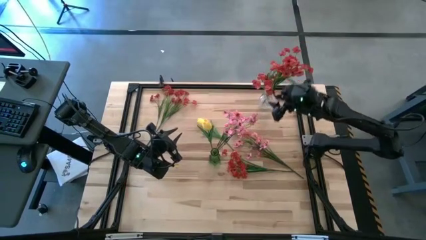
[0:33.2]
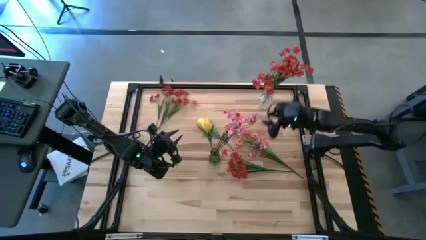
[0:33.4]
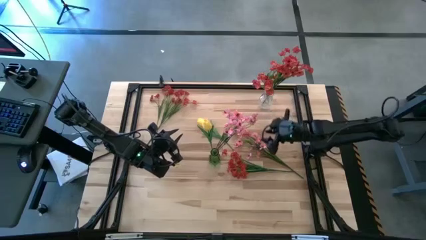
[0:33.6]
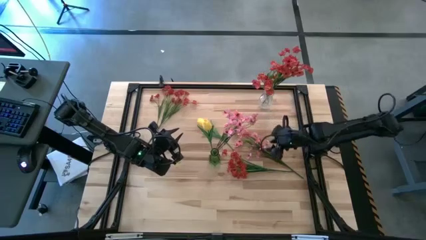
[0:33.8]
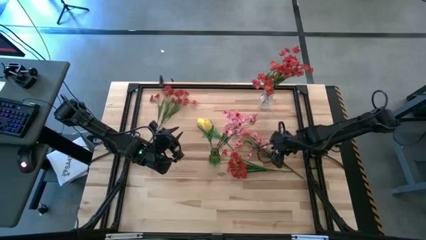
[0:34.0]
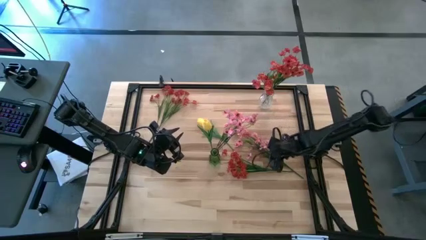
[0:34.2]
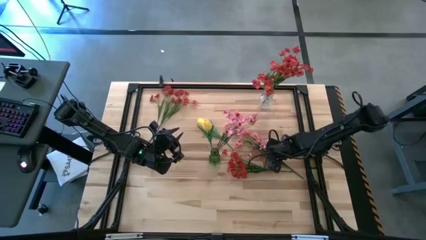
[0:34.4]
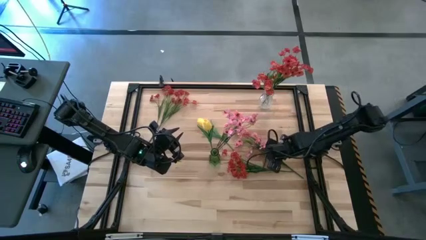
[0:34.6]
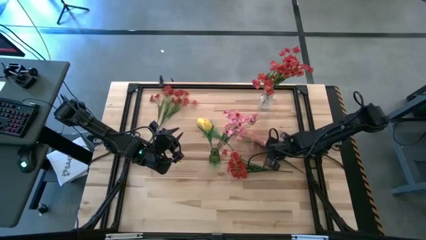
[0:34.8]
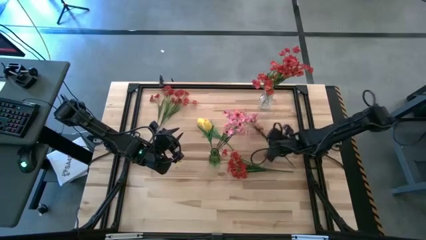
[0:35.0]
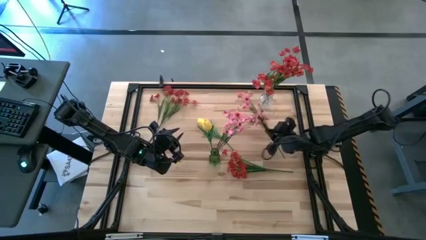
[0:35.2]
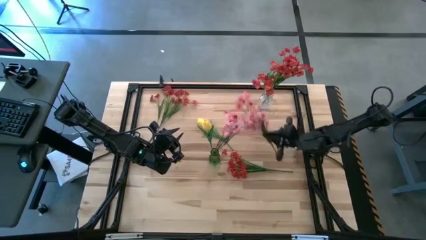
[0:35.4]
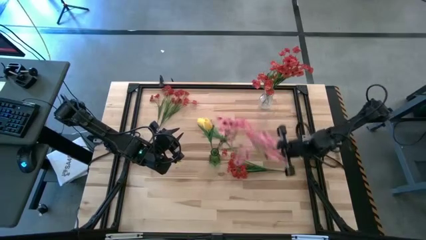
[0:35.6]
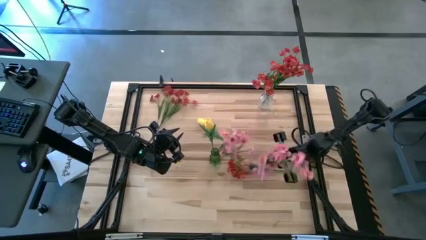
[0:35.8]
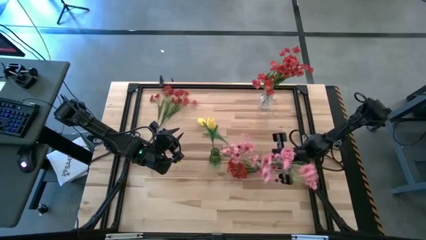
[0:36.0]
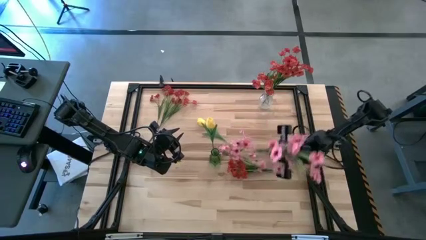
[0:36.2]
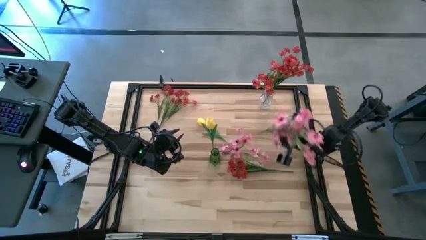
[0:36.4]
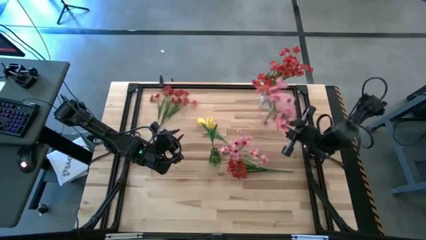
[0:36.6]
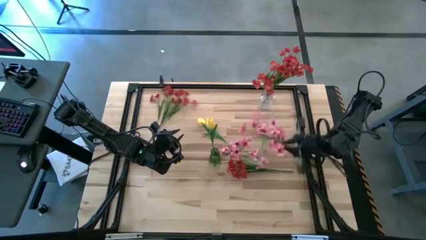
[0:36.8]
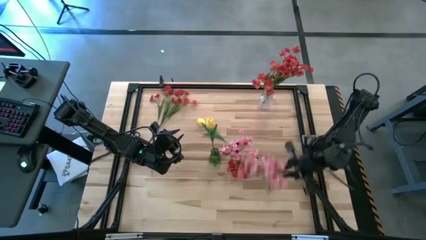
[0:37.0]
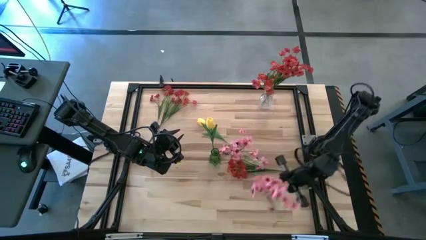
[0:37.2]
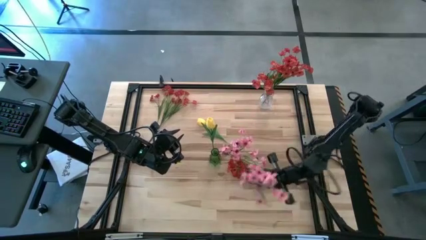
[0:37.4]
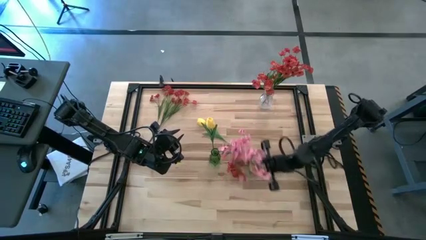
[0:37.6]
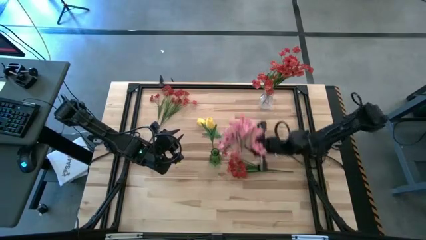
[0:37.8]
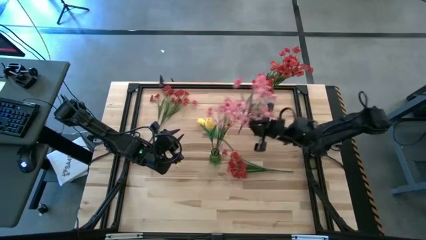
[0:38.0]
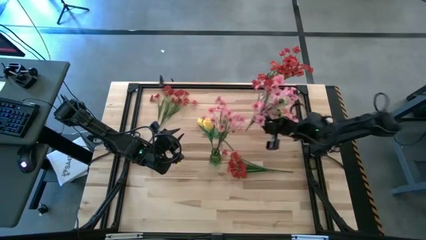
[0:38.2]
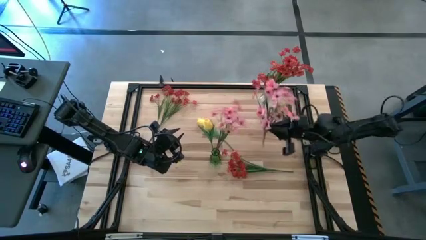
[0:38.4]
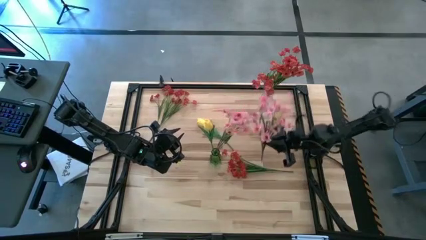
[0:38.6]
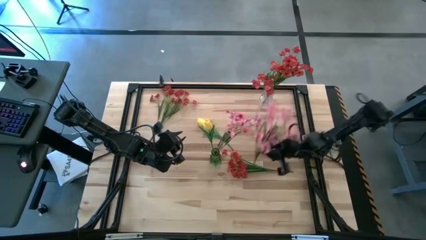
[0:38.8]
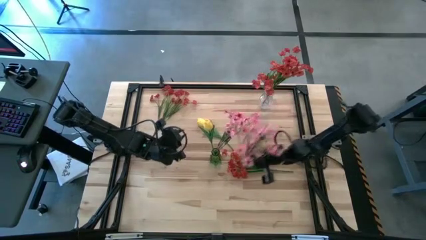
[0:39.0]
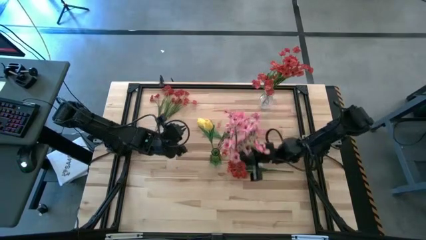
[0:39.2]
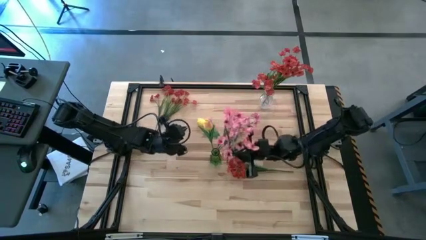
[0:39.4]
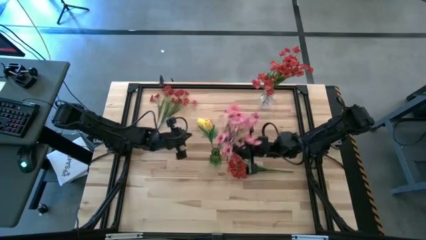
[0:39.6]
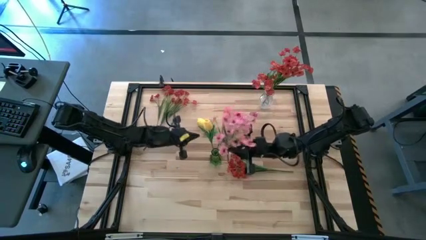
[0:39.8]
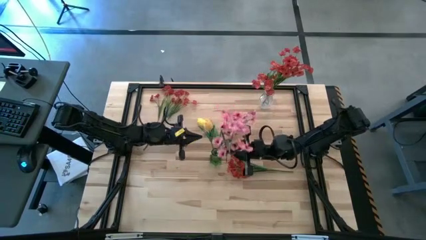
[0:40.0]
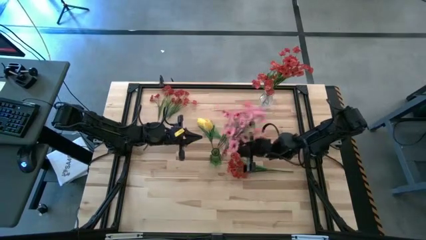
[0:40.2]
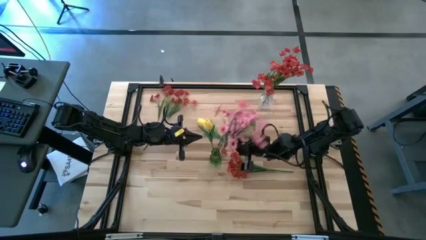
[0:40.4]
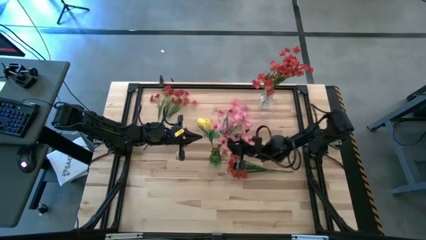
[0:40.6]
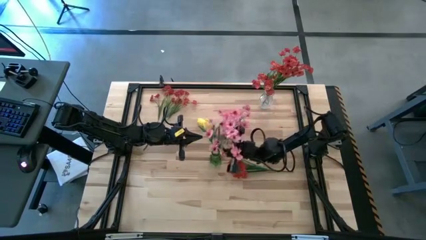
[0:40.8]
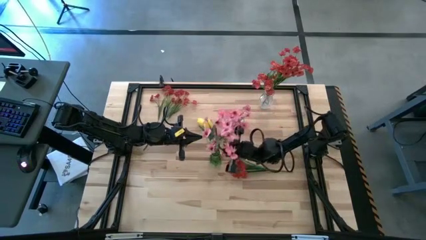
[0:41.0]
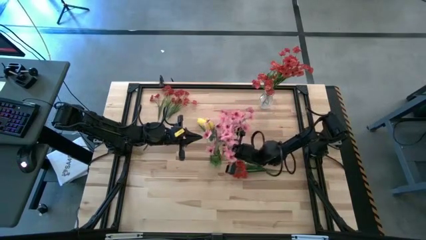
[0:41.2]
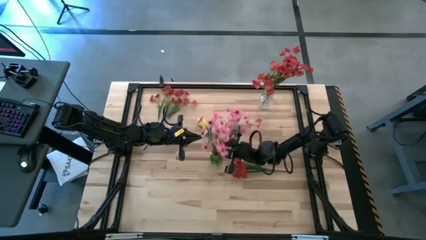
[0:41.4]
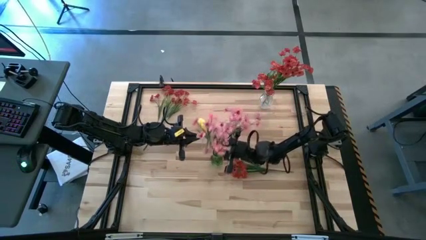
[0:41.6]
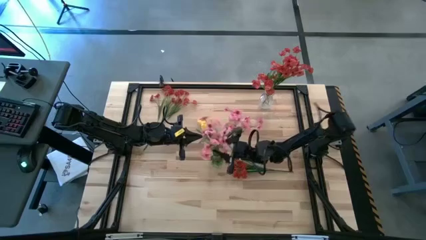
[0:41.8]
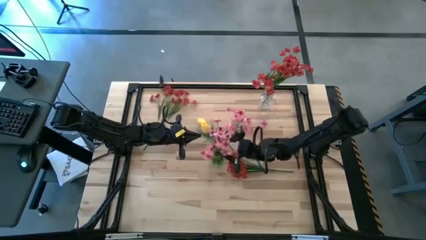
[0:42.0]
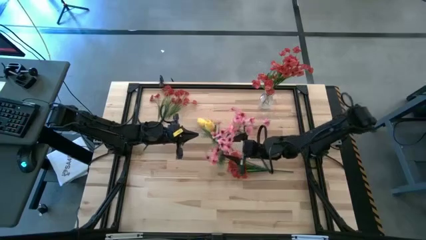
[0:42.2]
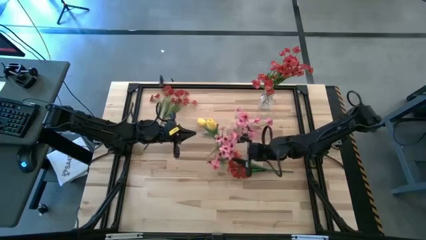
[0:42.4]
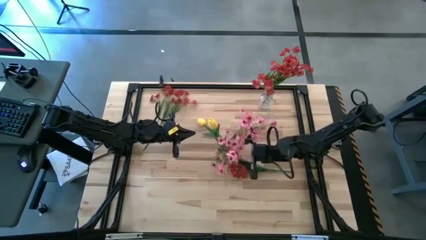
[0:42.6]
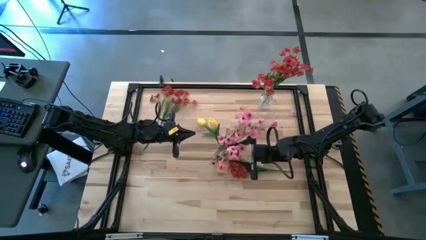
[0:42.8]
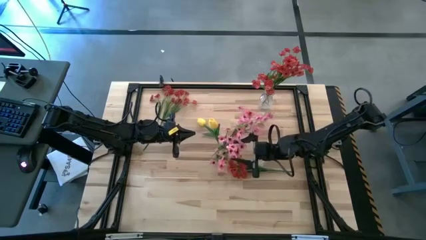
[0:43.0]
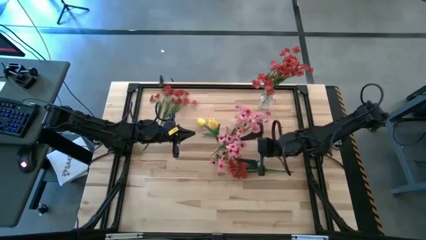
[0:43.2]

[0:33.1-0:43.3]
Task: Sort flowers into vase by color
Put the pink flowers into the green vase

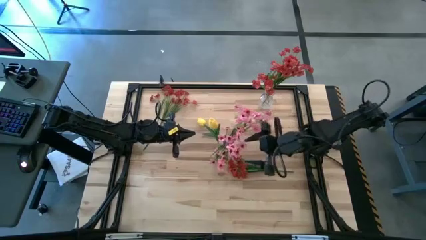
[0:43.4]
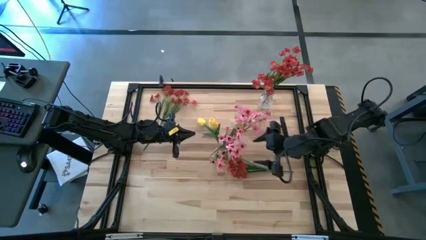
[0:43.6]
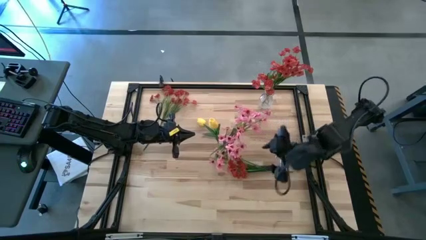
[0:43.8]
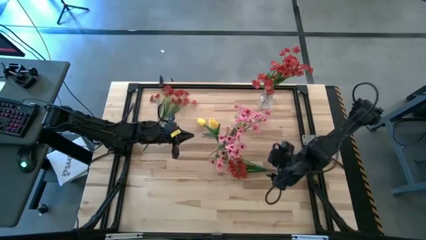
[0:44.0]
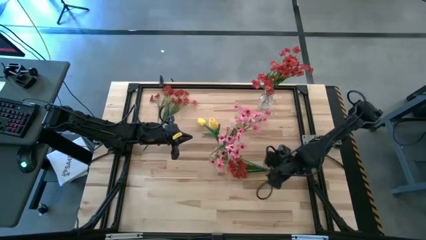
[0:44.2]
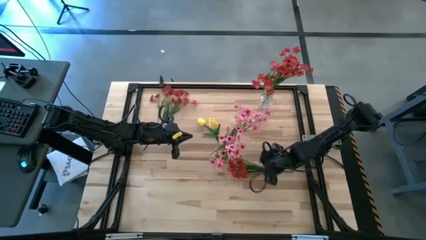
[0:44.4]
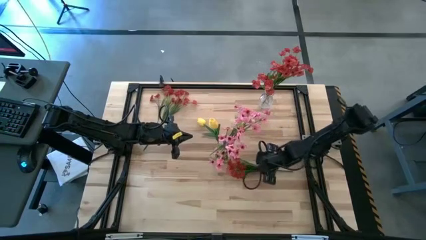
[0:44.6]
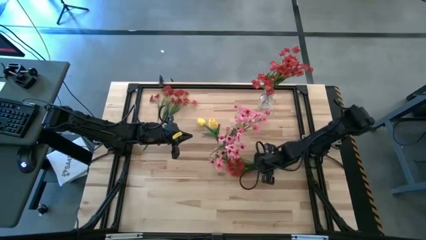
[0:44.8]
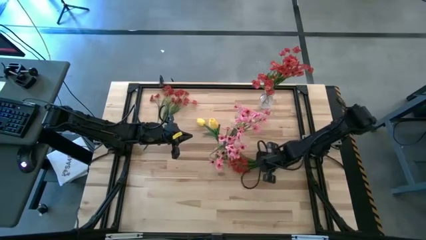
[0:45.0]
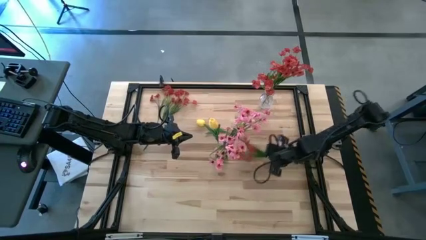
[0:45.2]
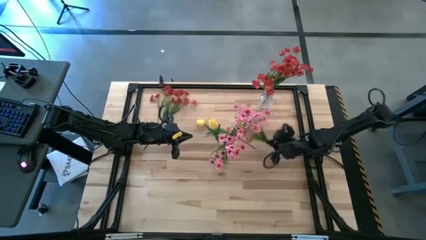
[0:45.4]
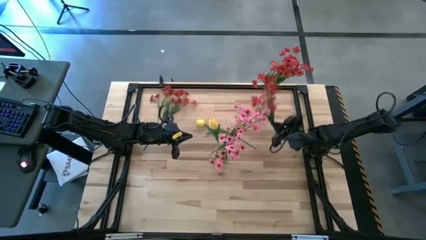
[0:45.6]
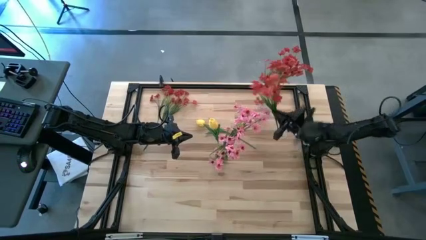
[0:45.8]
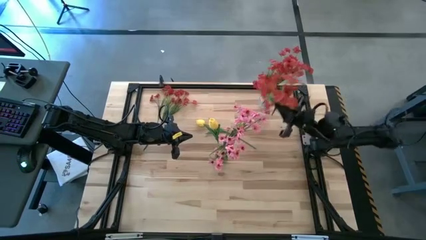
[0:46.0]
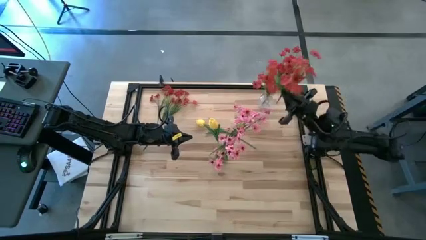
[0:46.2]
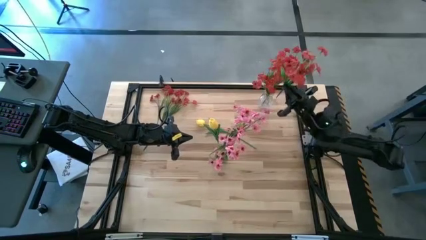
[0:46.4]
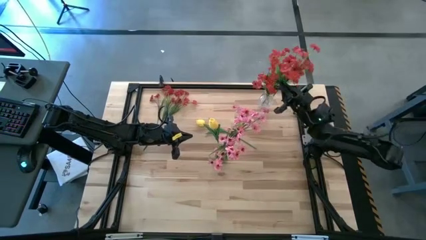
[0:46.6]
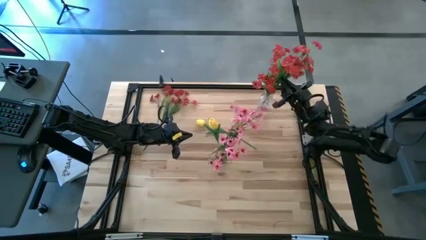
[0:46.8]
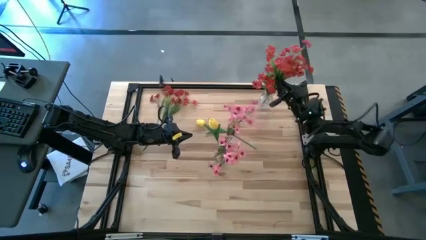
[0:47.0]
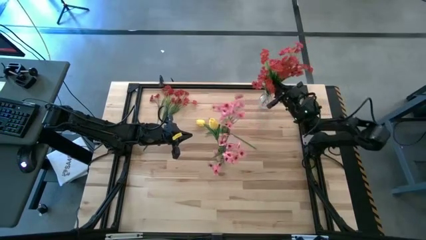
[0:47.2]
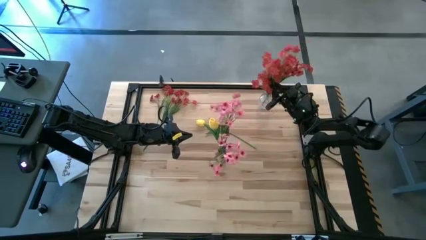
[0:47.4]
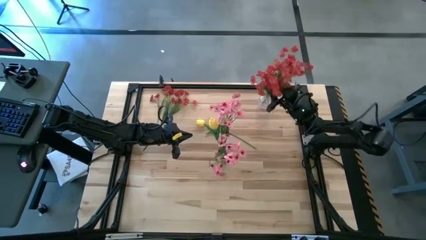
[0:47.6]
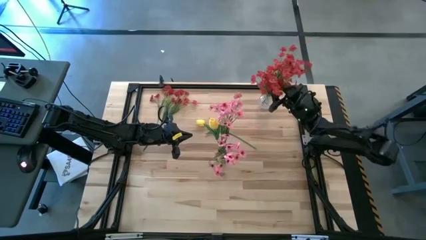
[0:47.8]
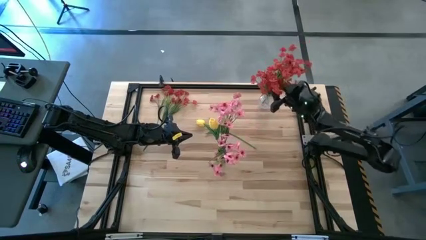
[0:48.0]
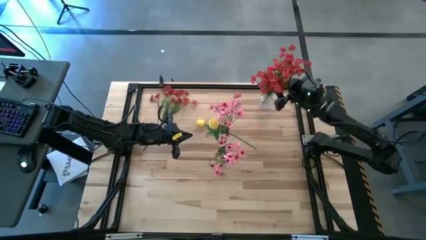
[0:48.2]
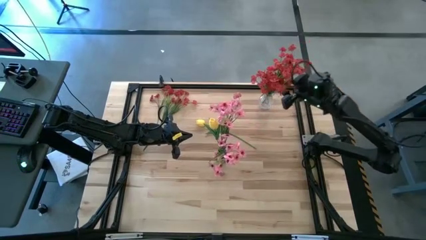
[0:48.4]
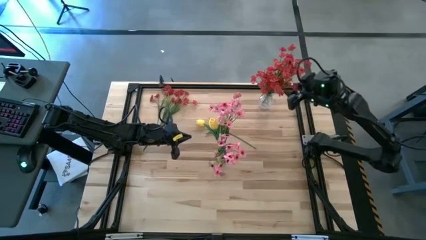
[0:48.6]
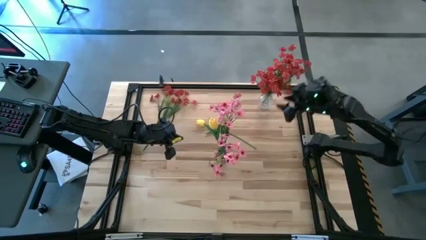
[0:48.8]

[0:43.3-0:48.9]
Put the bottom red flowers into the transparent vase

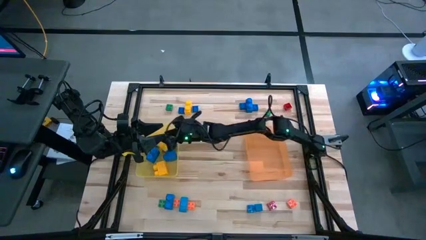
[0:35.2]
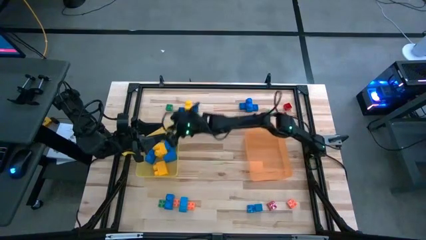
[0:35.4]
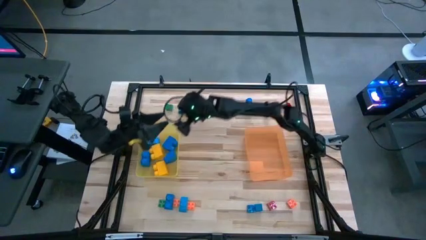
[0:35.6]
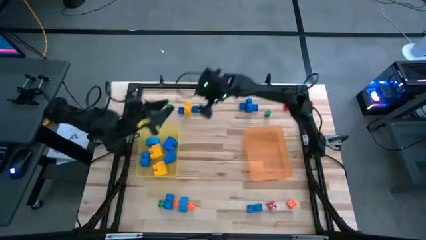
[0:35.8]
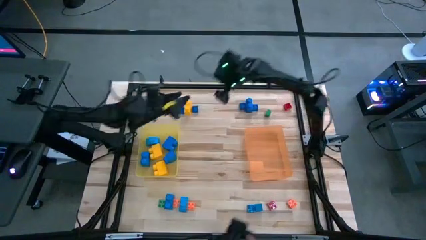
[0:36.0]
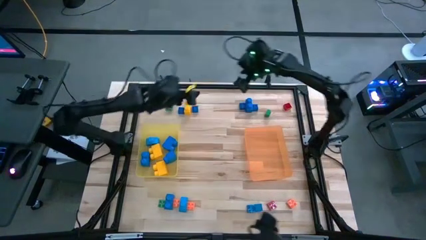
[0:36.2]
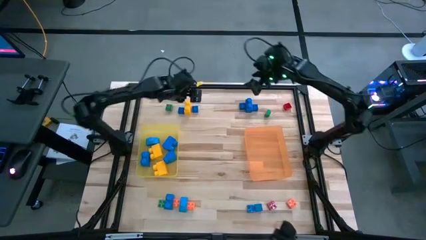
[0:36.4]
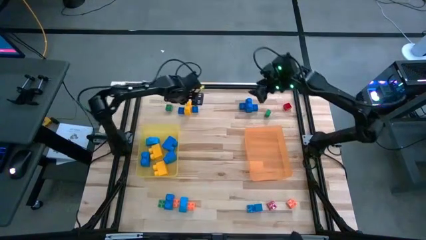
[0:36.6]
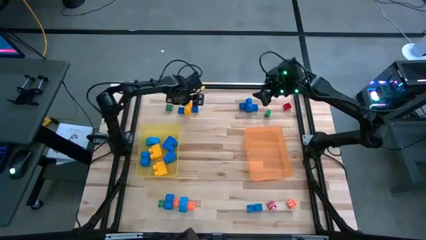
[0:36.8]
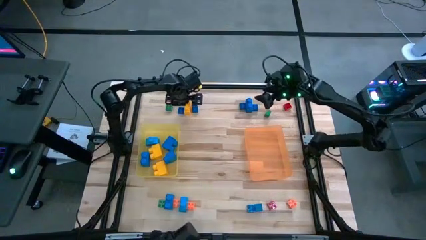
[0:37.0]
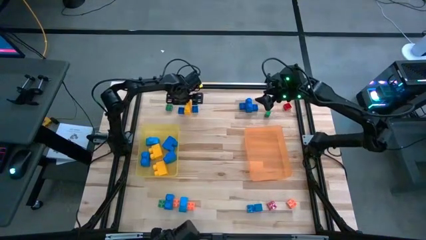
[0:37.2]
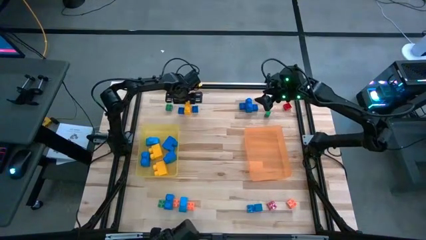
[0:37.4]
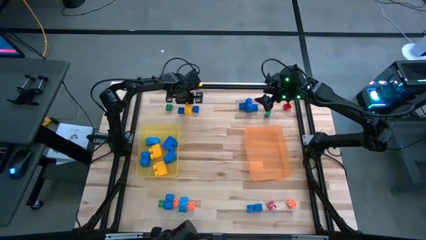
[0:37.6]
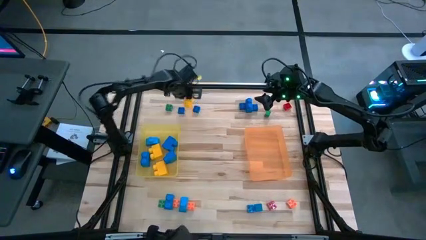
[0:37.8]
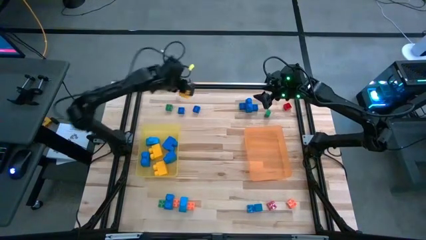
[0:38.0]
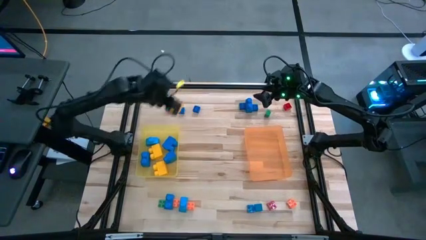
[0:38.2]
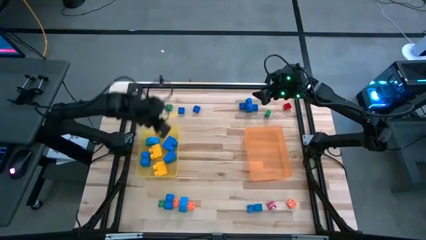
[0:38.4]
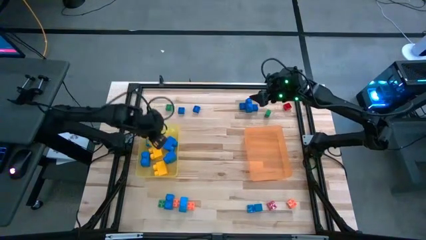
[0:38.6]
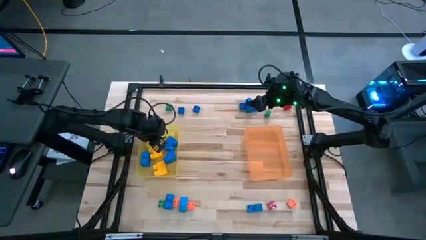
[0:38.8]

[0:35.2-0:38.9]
Task: Sort blocks by size
Put the large yellow game piece into the yellow bin
